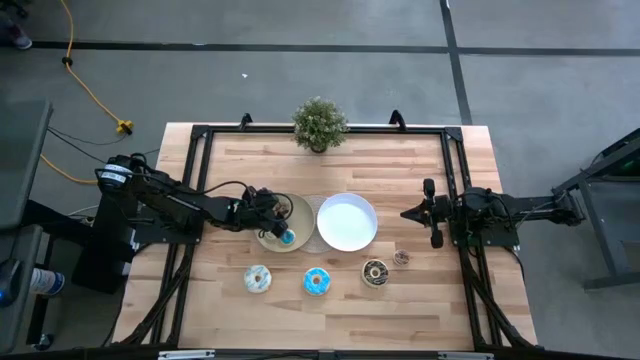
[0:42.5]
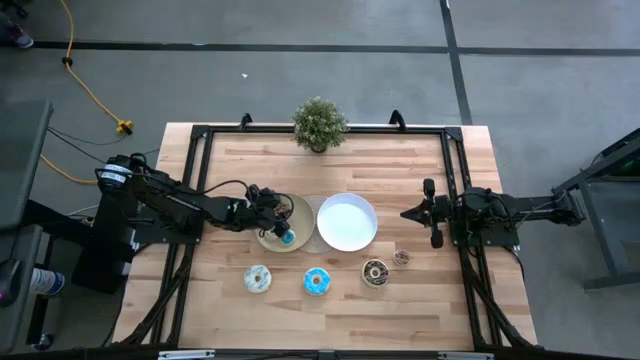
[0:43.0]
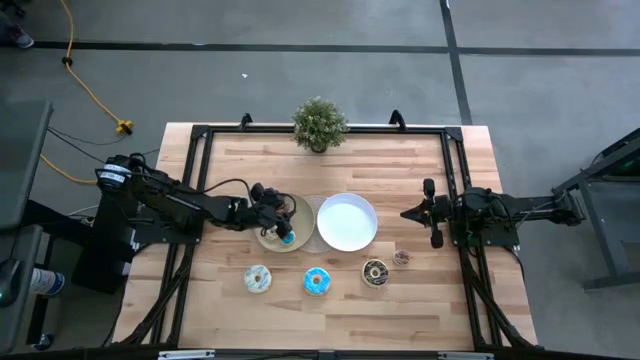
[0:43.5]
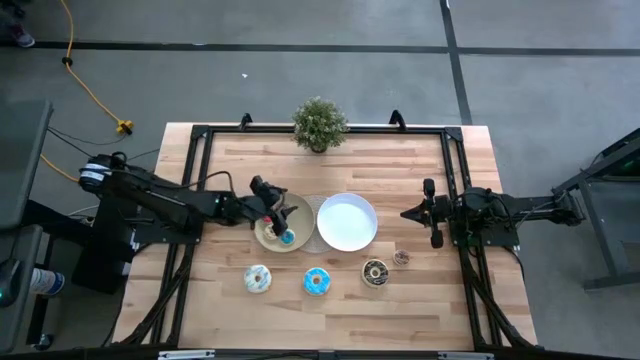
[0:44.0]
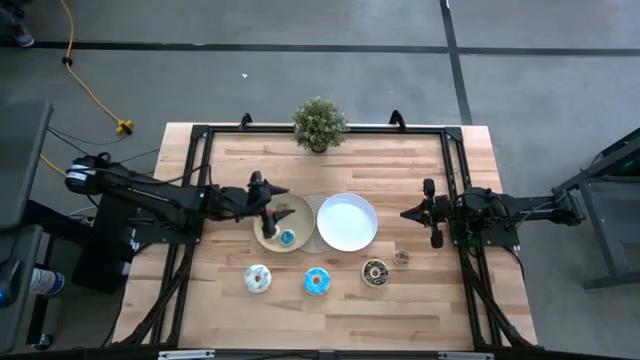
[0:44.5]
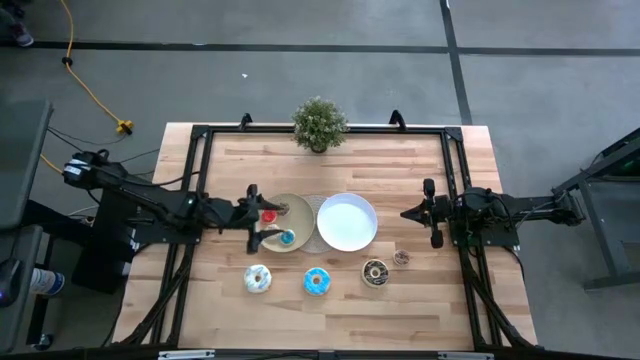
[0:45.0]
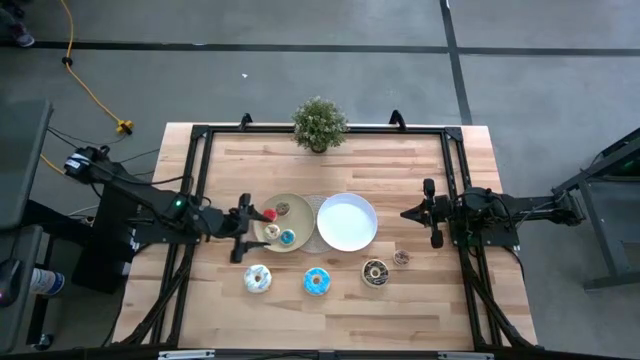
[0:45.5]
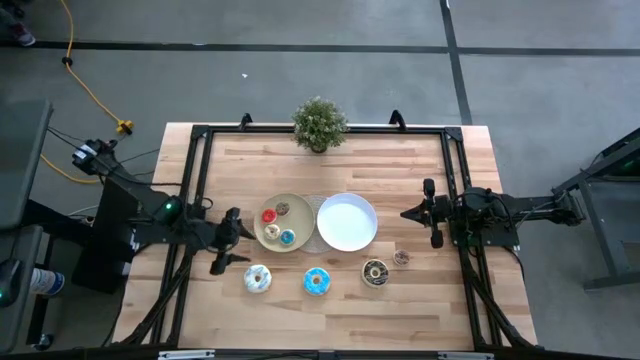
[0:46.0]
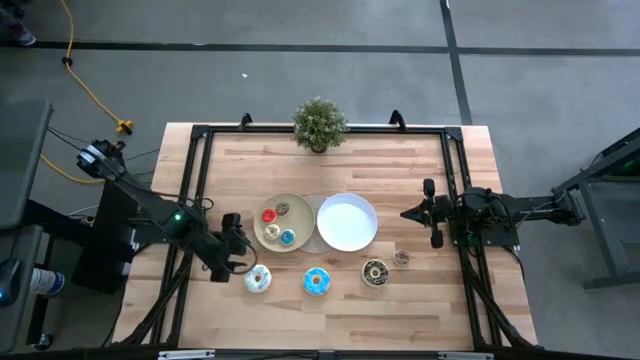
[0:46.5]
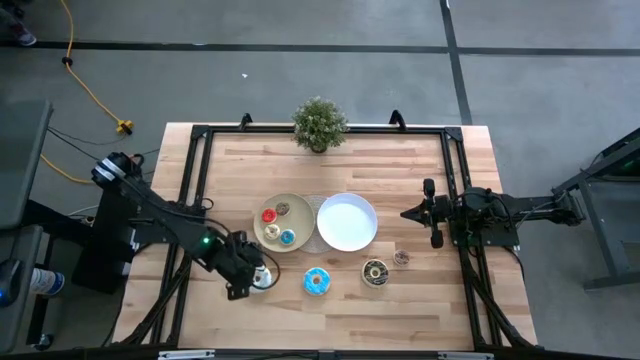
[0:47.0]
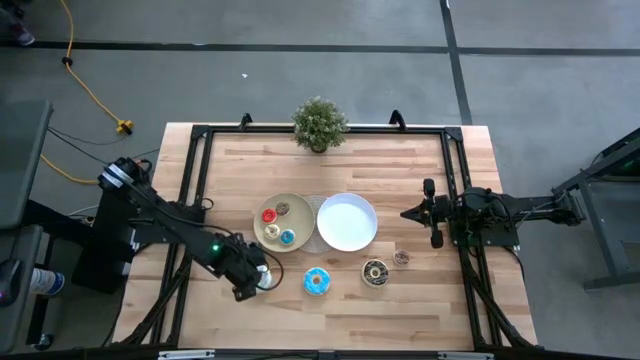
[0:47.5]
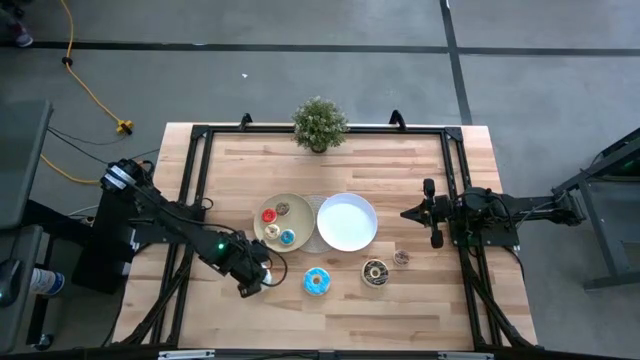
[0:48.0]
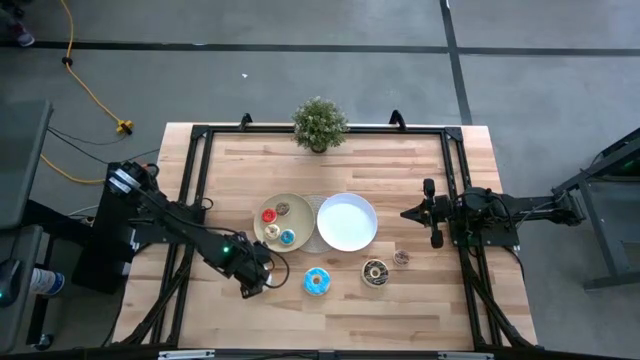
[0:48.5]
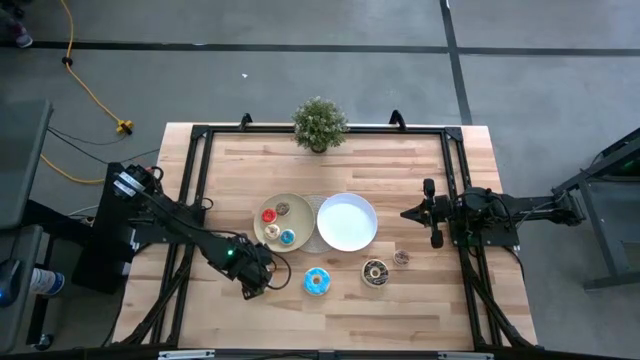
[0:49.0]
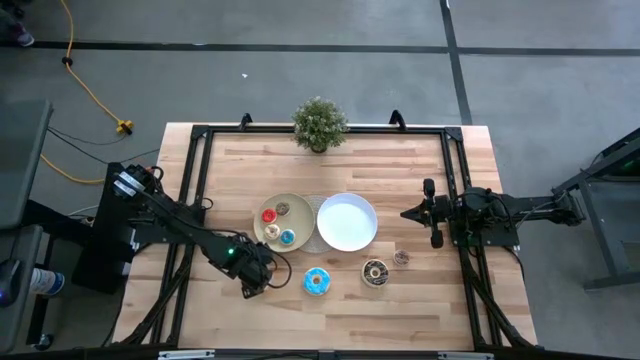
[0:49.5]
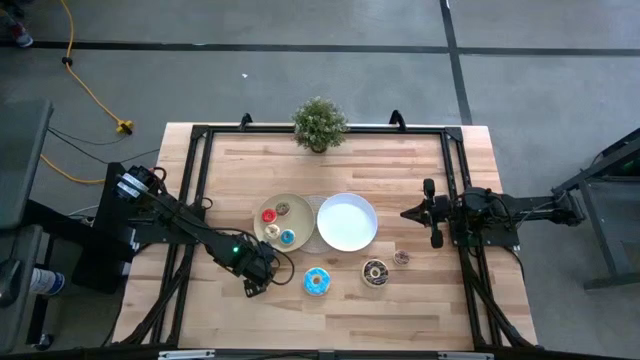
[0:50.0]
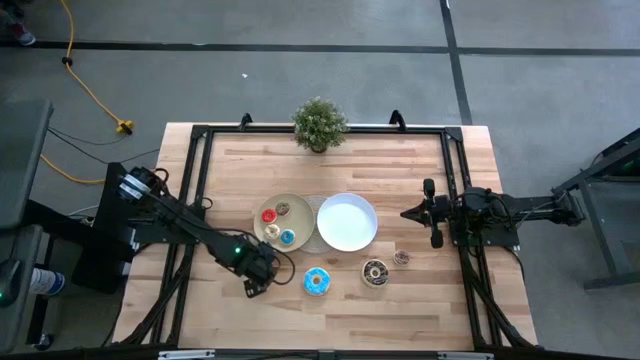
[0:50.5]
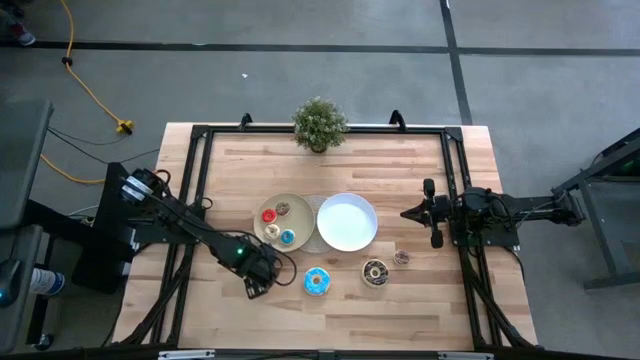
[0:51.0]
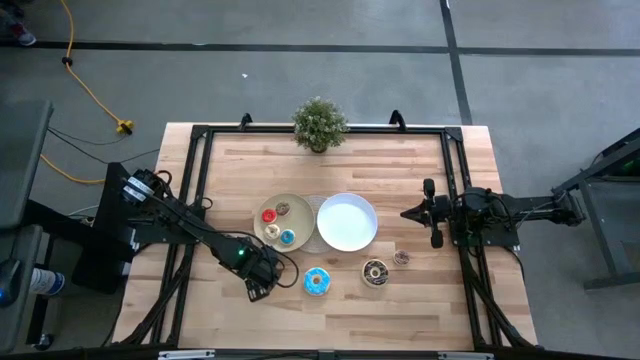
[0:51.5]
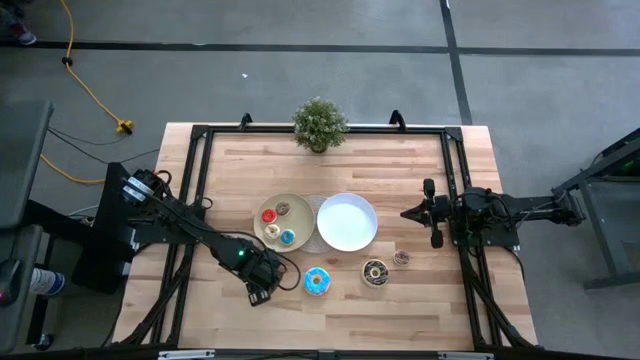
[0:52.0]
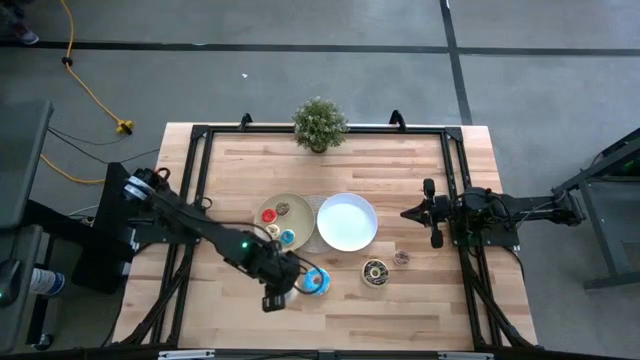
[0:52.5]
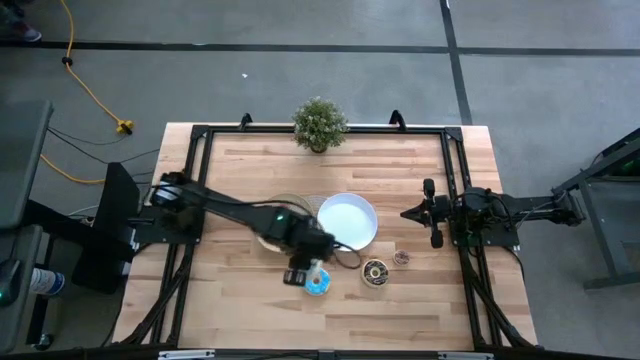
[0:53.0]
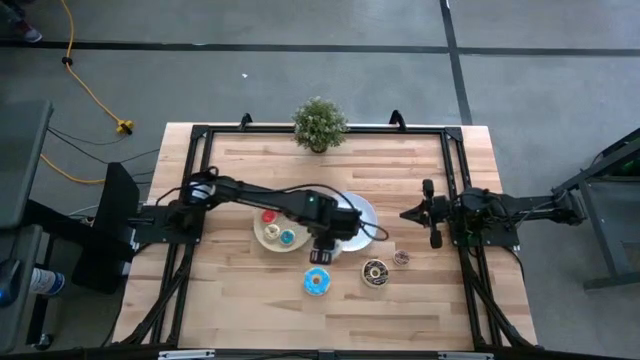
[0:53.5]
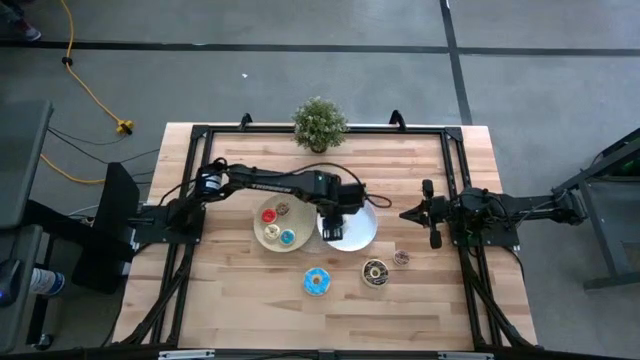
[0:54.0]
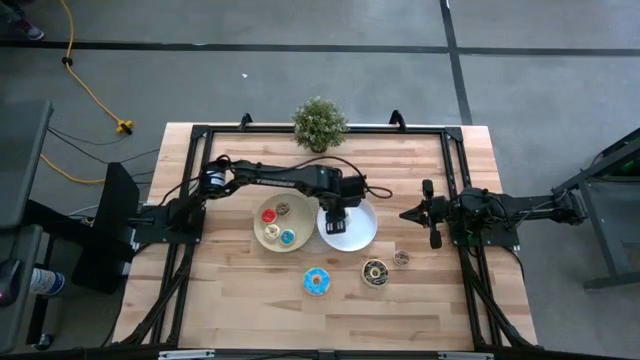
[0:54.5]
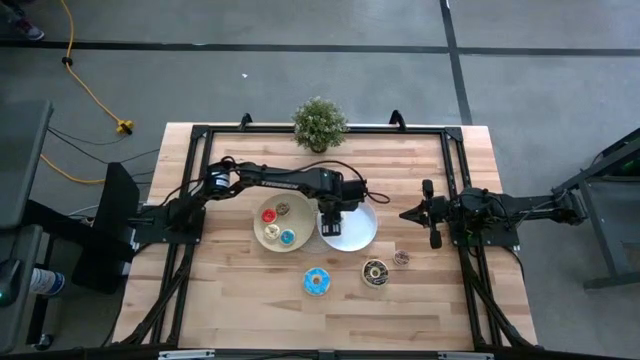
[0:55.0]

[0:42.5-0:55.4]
Task: Pick & Place donuts
Put the large white donut on the white plate

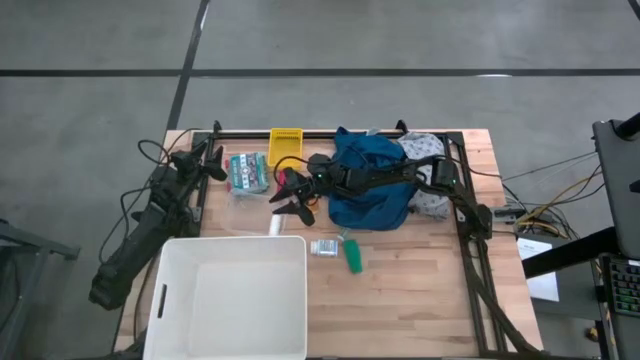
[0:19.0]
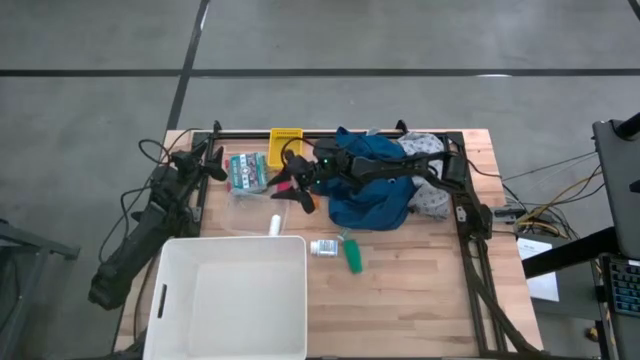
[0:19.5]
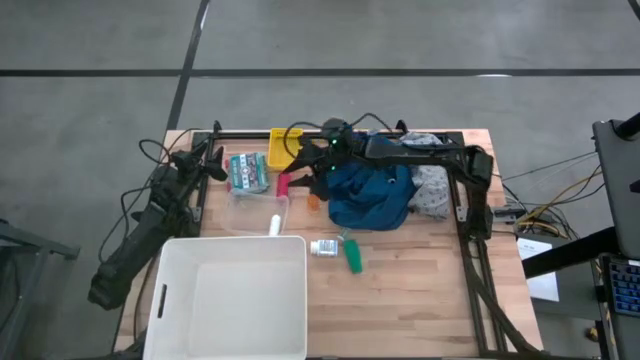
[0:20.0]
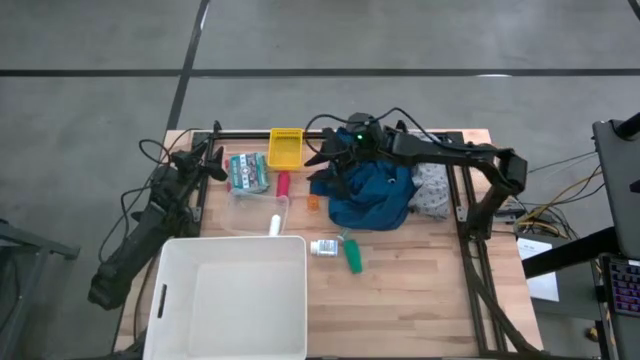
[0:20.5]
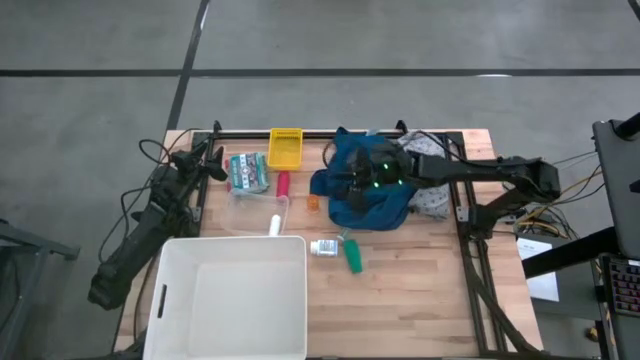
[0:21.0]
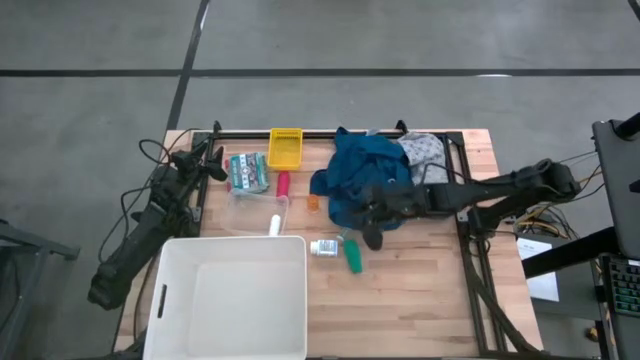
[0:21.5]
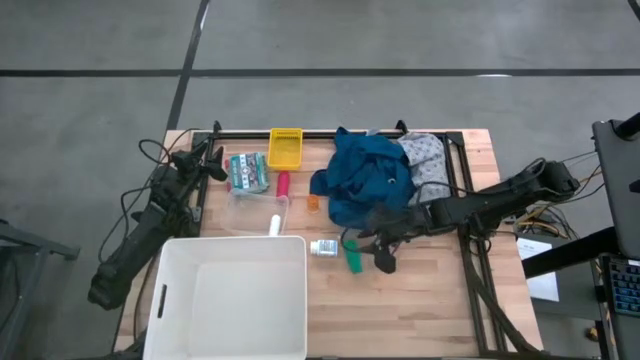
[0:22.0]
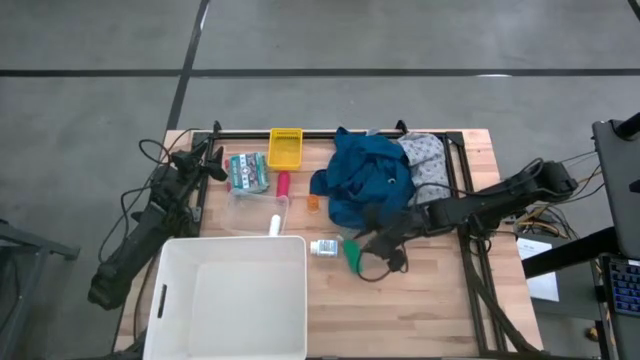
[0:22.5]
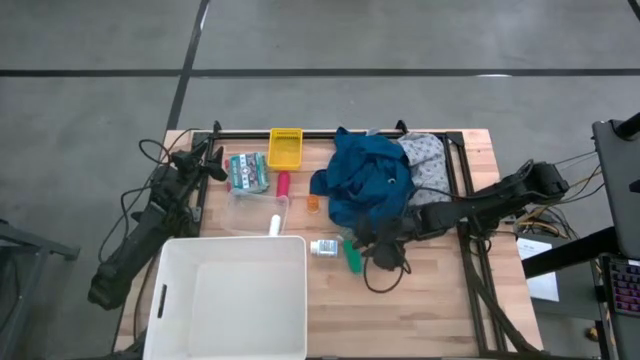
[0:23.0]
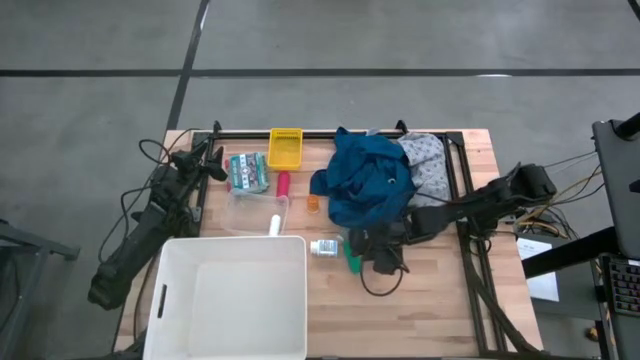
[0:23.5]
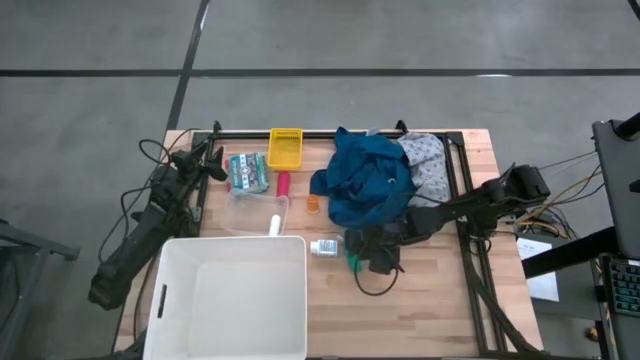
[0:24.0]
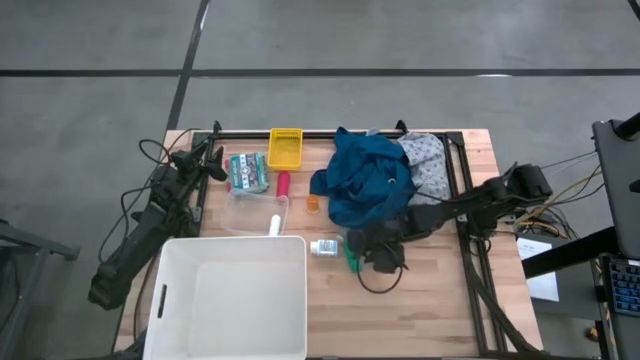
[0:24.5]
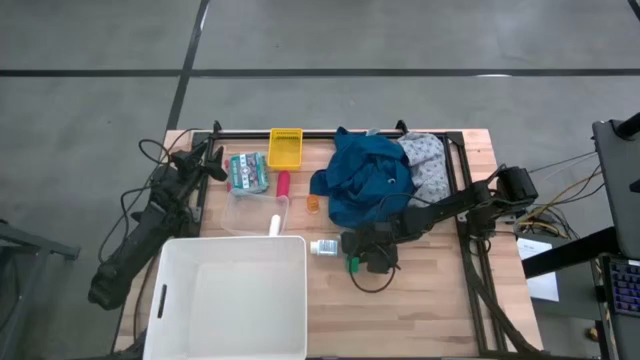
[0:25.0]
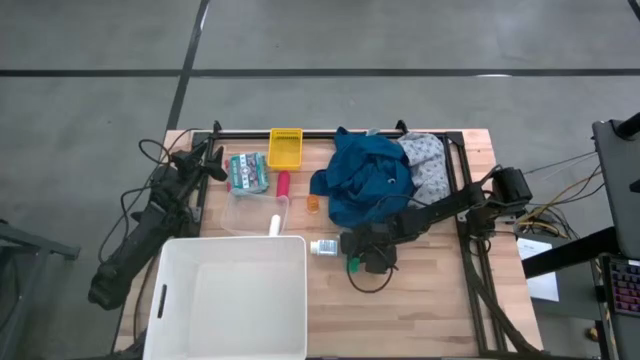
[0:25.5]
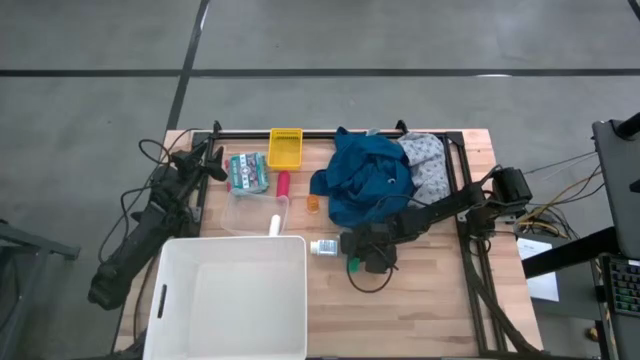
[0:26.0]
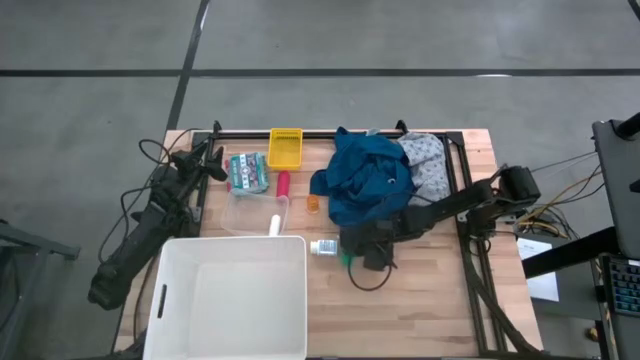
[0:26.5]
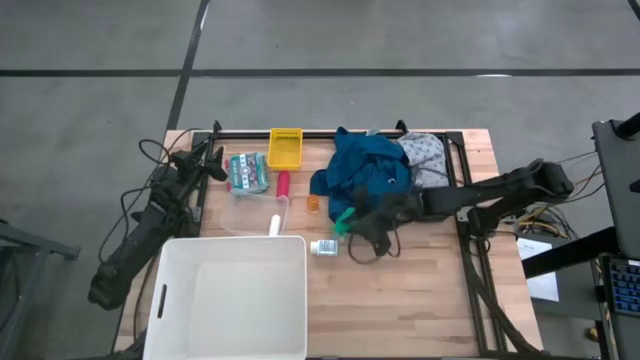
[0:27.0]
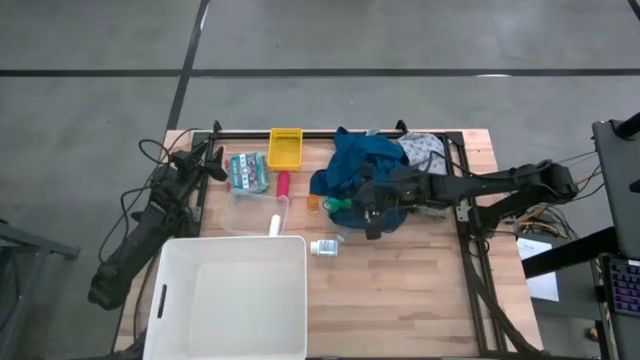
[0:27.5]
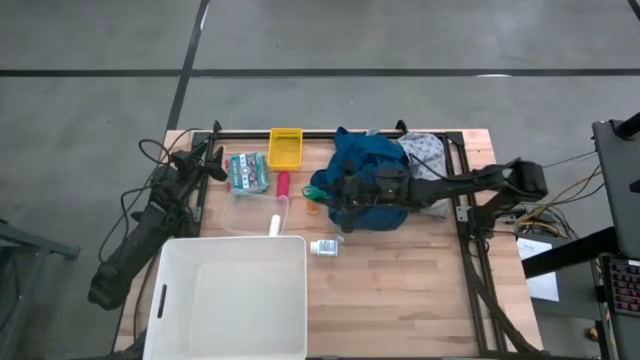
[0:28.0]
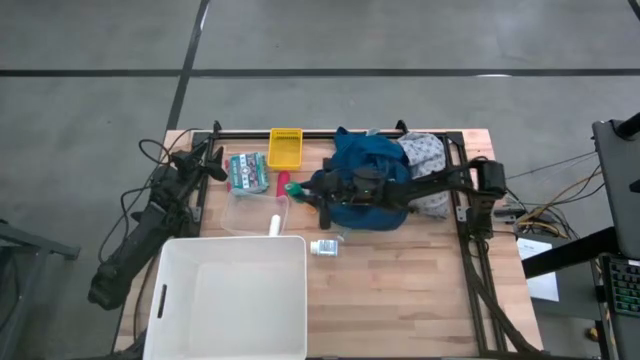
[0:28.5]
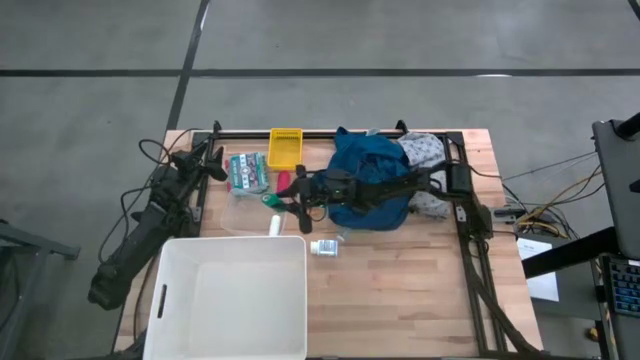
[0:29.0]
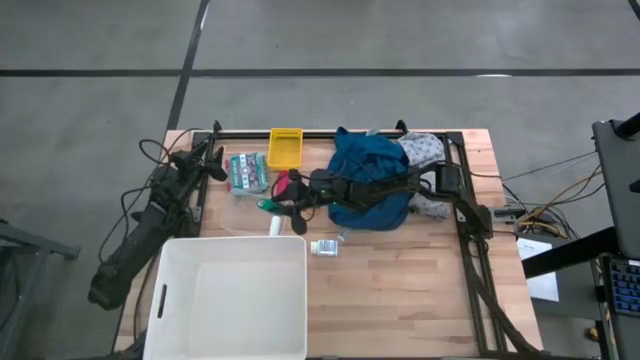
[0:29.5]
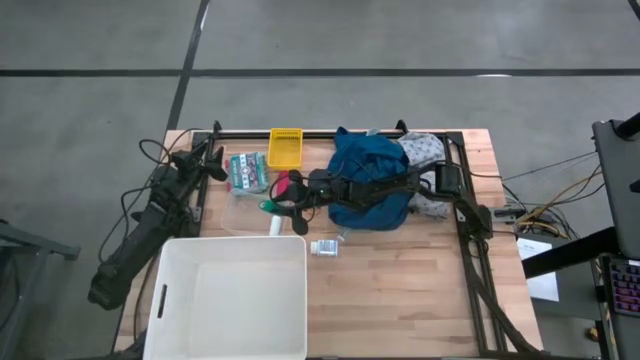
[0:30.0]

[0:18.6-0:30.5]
Task: Pick & place medical supplies in basket/bin
Put the green bandage into the transparent bin
